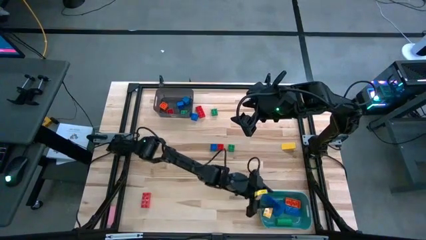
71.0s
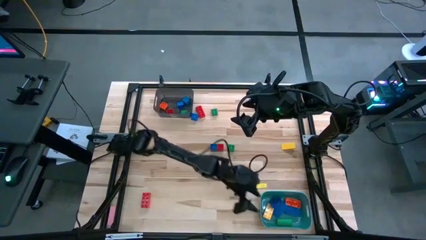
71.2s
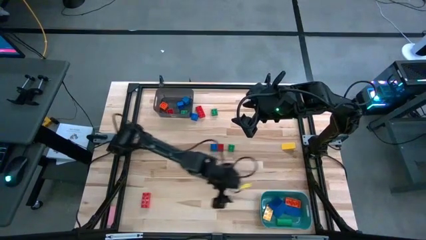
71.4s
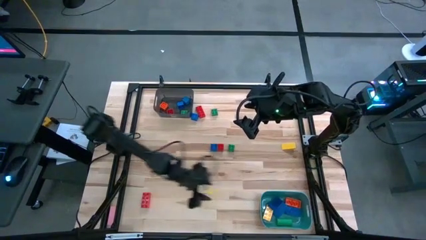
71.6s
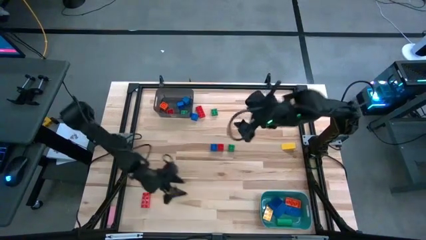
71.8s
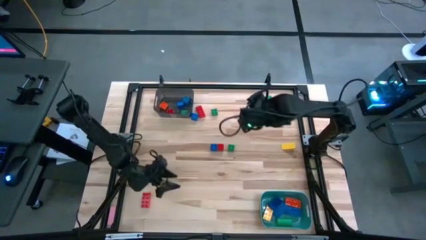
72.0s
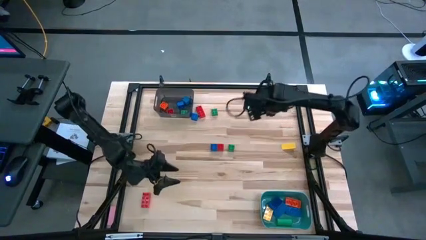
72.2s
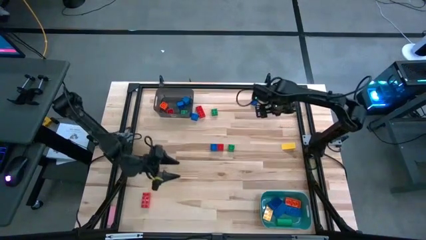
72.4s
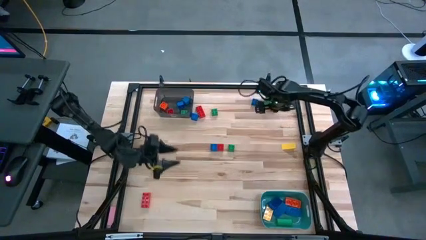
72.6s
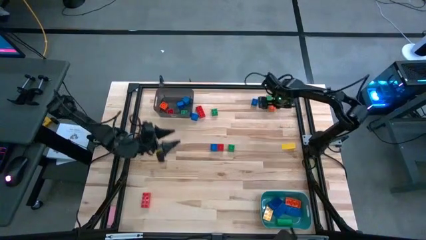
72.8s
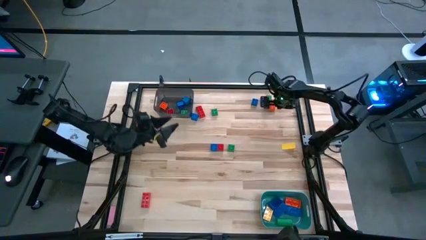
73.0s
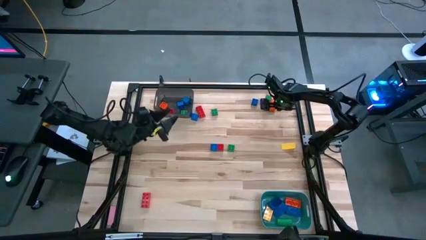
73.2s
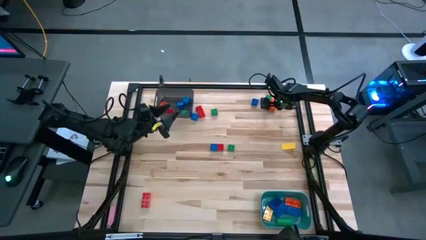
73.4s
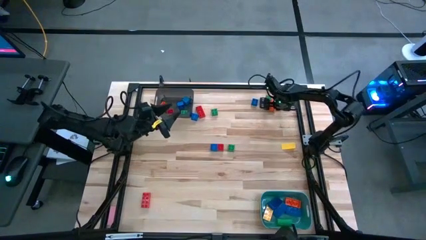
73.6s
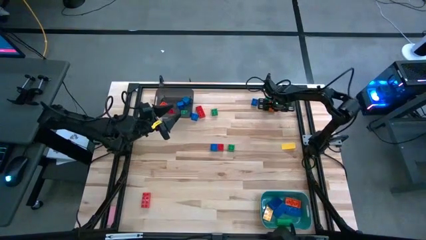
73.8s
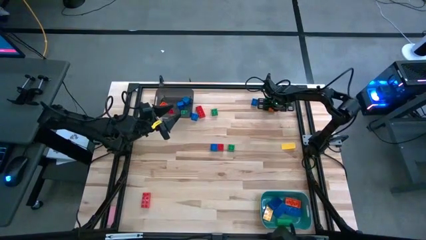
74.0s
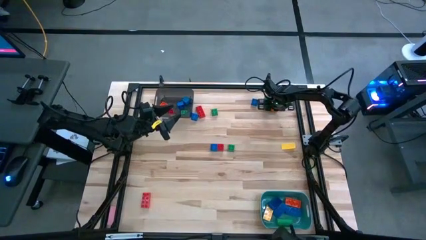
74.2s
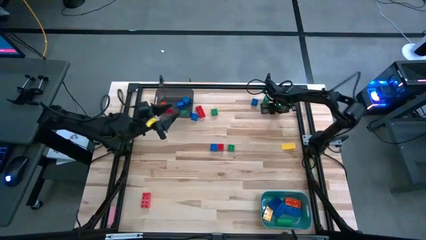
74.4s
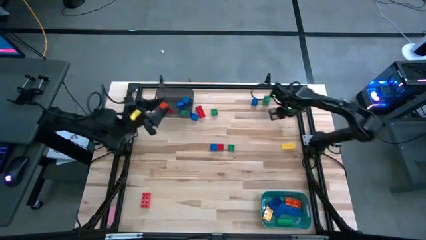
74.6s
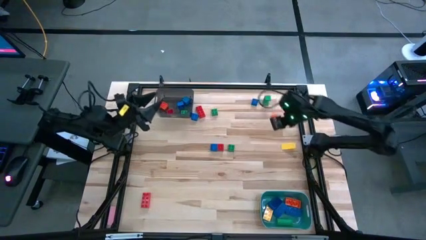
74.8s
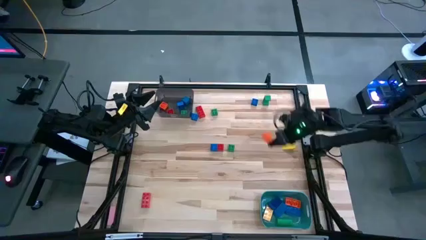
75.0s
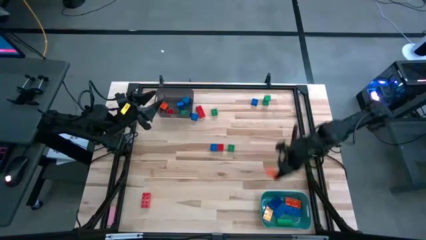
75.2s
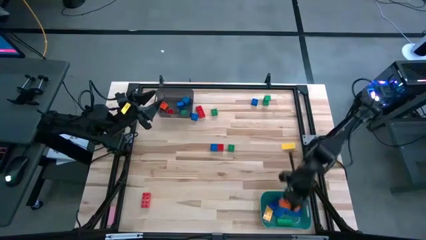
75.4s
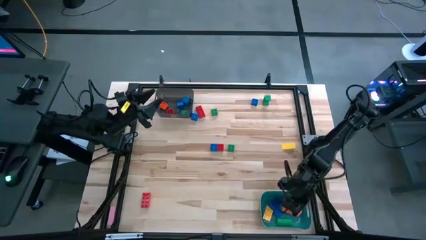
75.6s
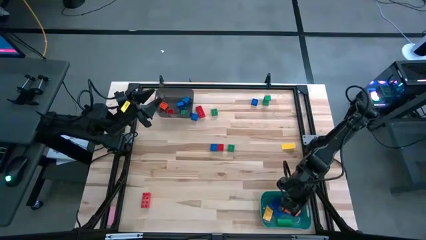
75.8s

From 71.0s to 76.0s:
Task: Sort blocks by size
Put the orange game piece into the blue bin

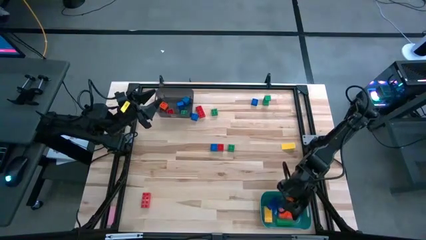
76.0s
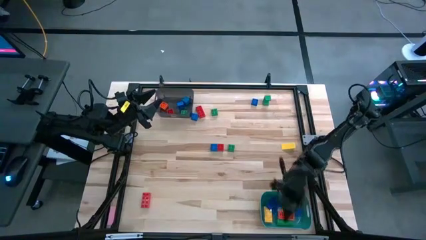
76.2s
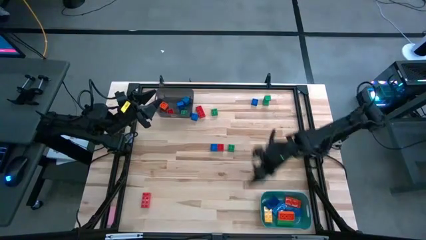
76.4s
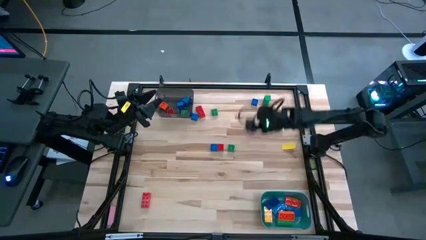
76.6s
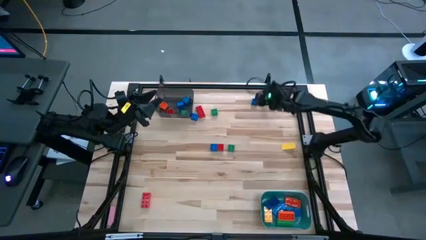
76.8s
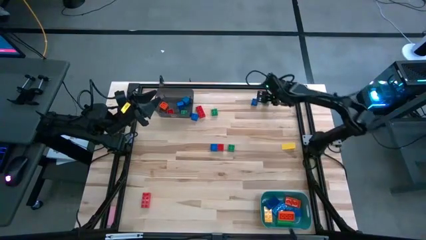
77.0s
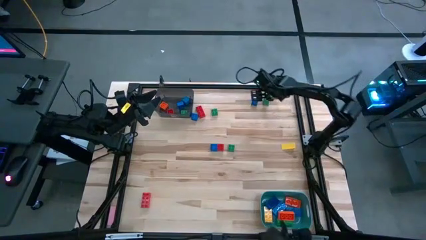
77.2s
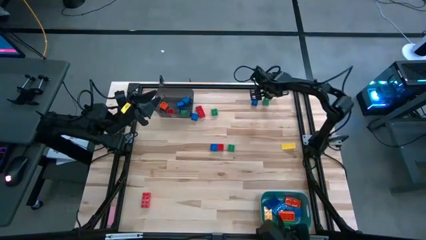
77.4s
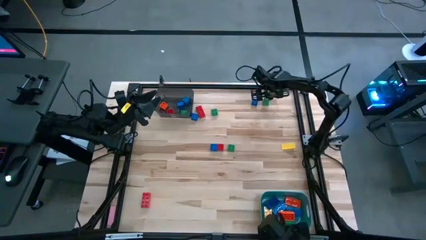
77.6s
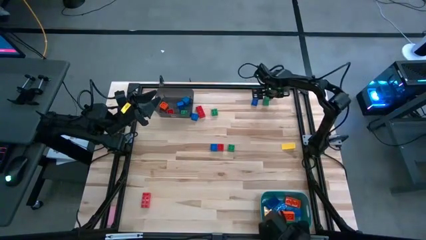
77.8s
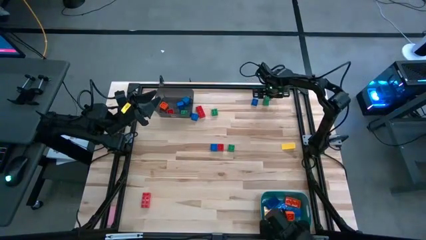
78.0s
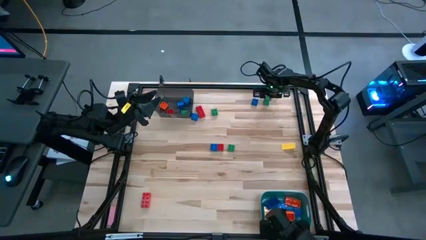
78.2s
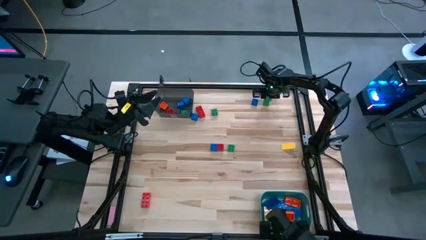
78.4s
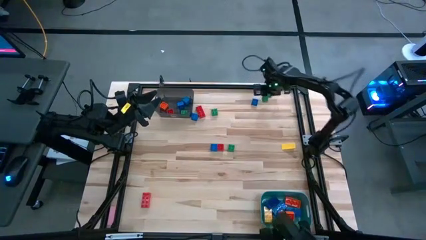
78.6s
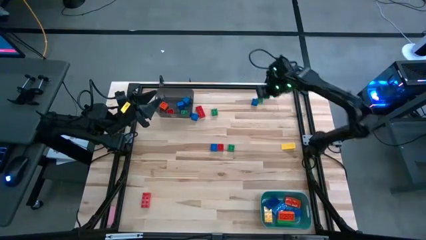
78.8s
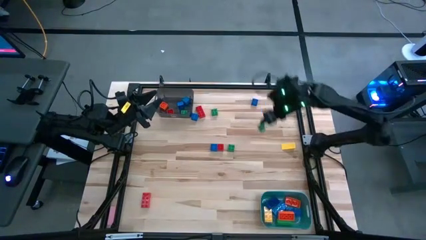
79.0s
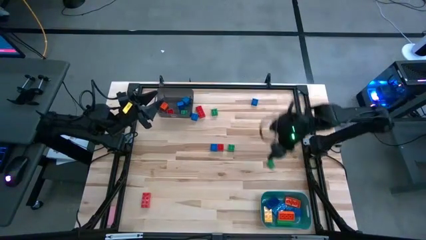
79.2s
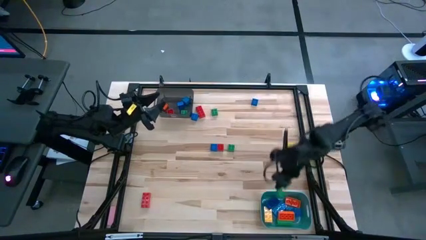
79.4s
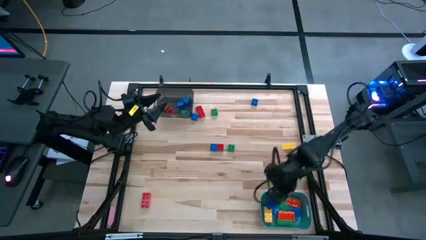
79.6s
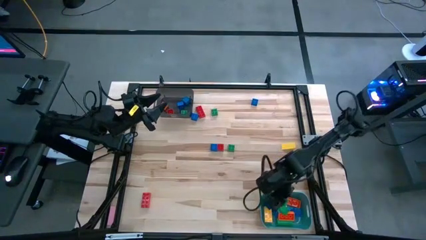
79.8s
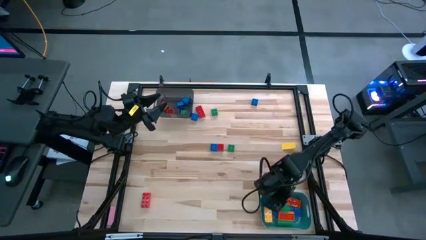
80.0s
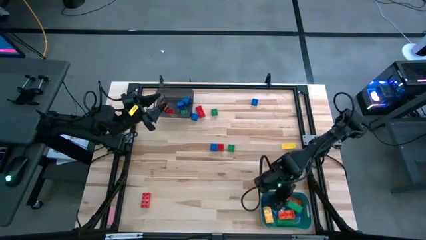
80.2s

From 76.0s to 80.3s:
Put the right green block into the blue bin

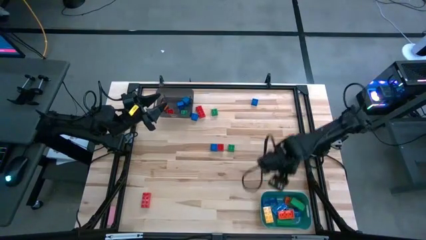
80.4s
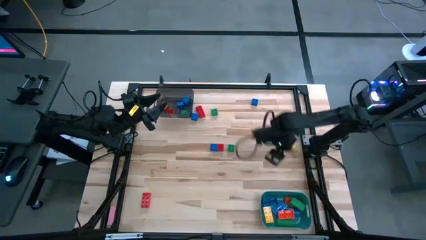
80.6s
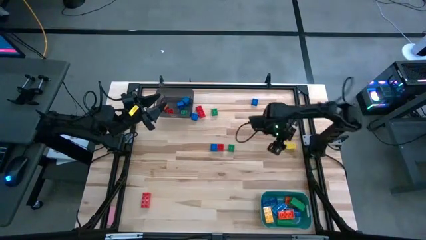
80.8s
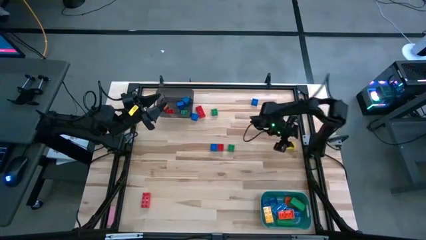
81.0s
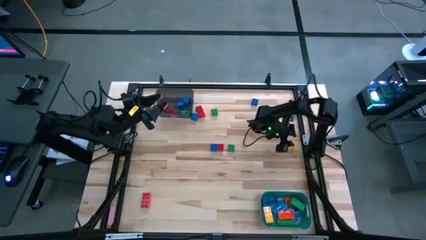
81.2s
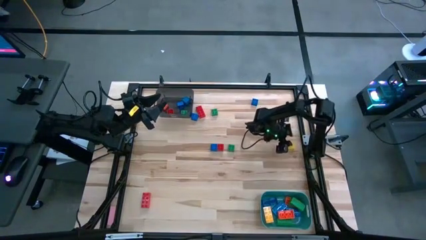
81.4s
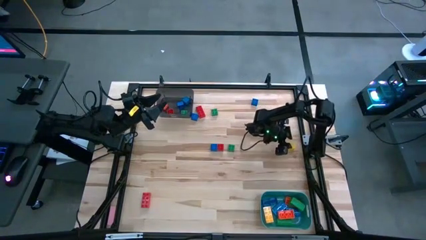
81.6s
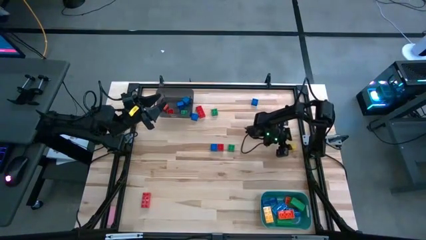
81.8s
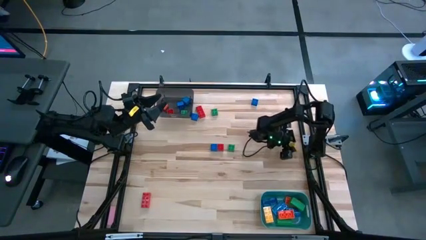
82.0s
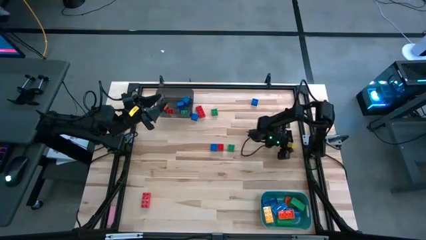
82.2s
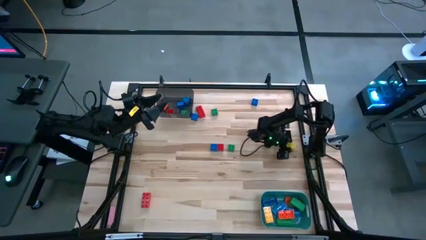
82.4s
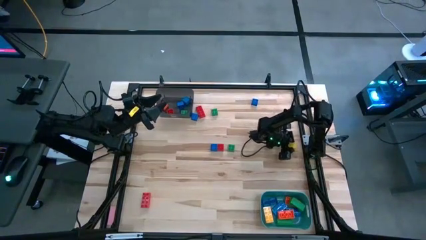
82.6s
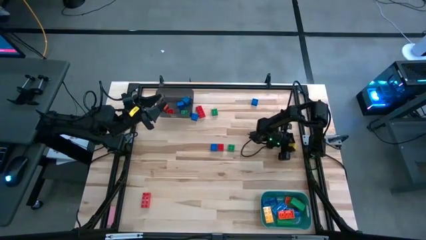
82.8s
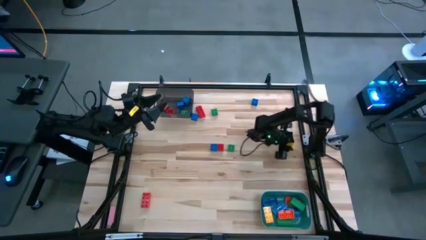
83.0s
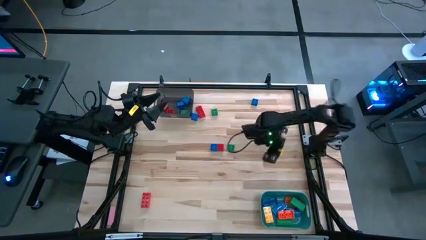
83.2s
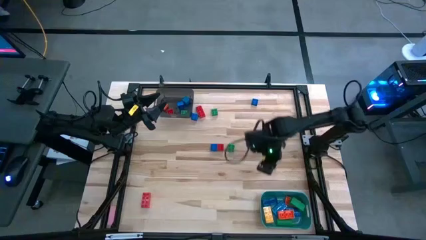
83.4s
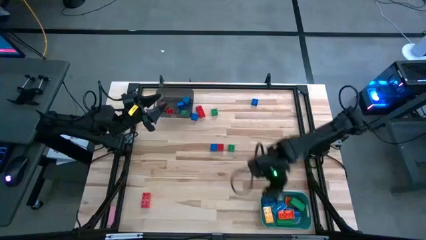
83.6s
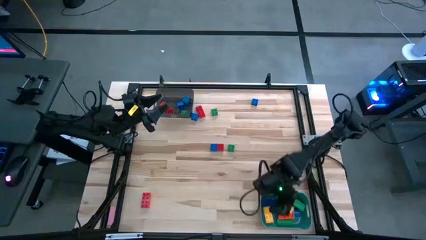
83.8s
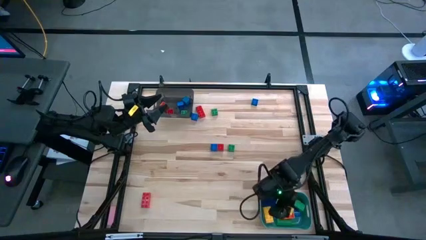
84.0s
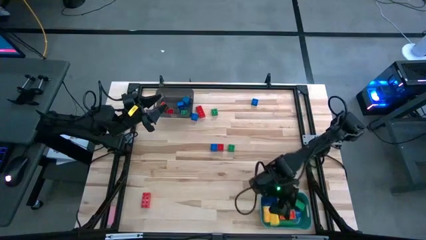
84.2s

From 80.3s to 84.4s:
Put the yellow block into the blue bin

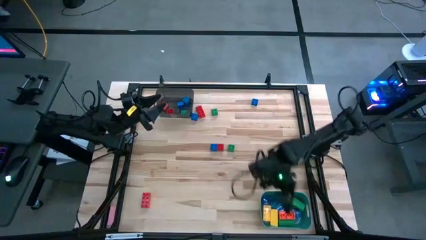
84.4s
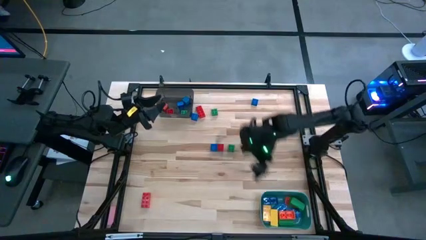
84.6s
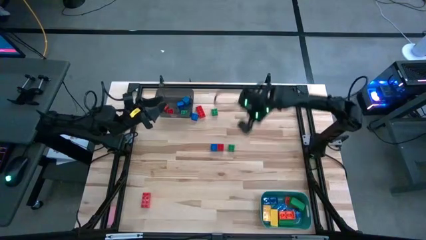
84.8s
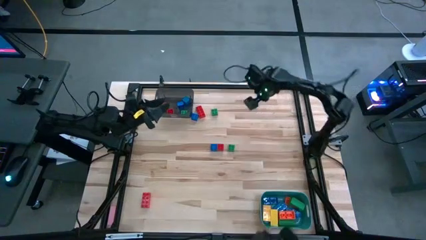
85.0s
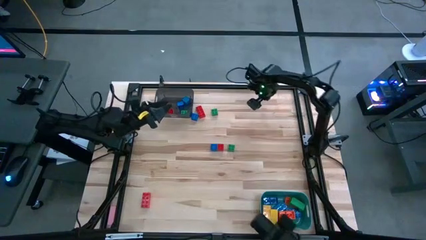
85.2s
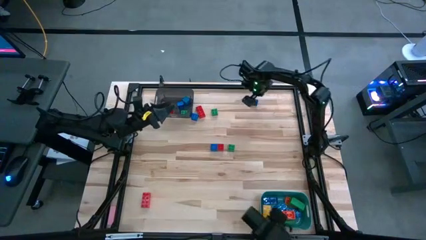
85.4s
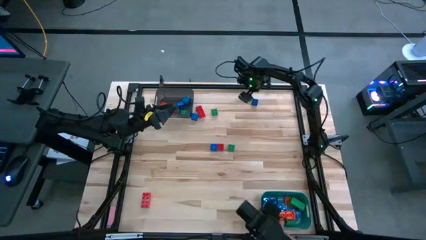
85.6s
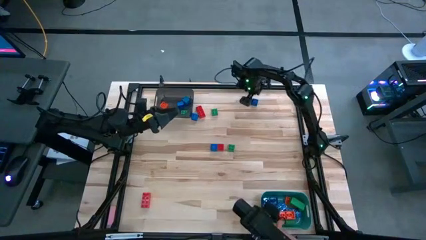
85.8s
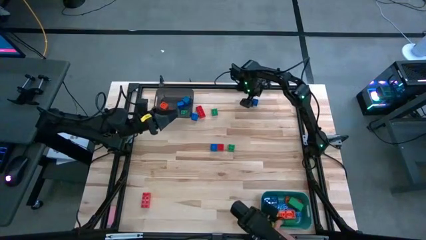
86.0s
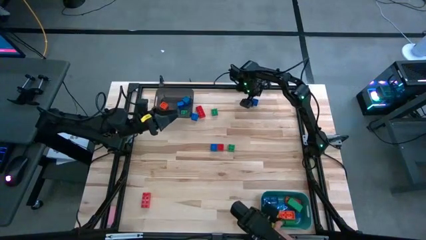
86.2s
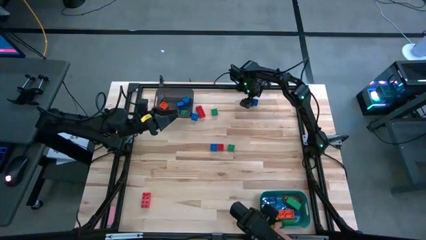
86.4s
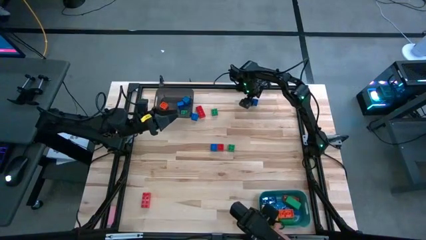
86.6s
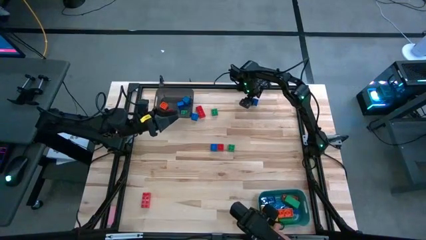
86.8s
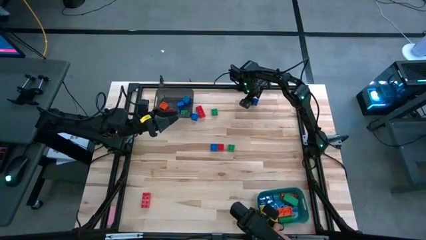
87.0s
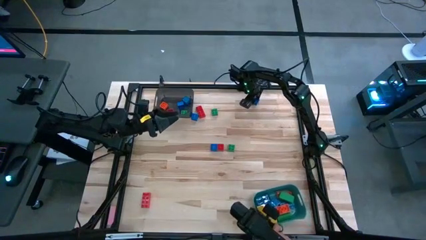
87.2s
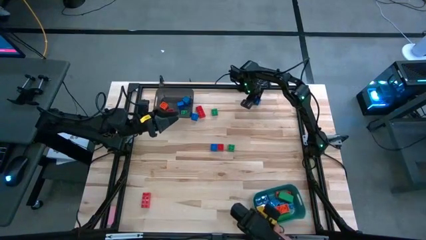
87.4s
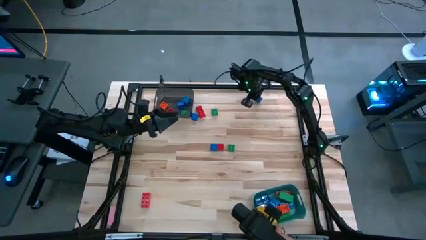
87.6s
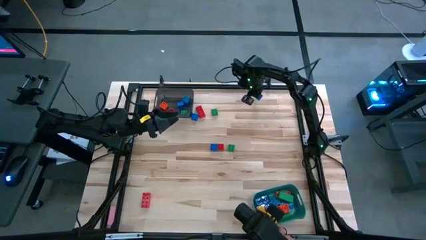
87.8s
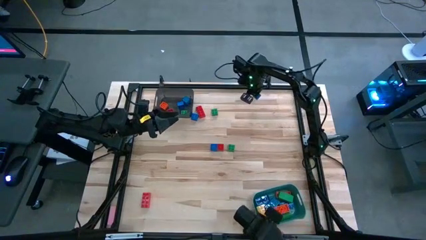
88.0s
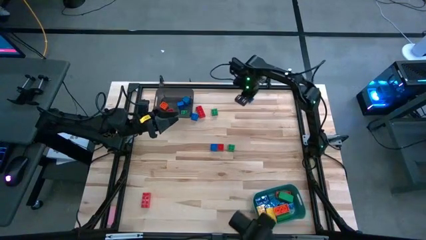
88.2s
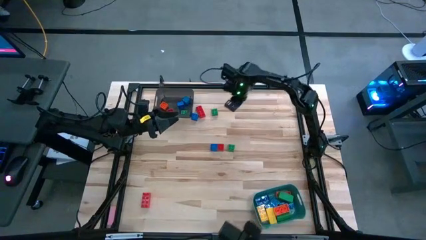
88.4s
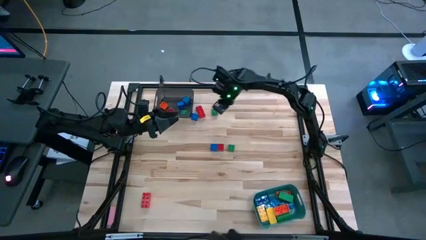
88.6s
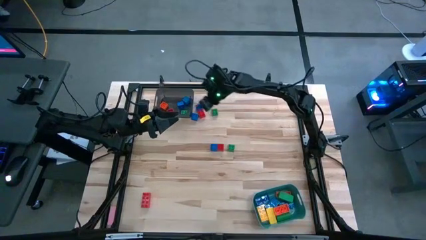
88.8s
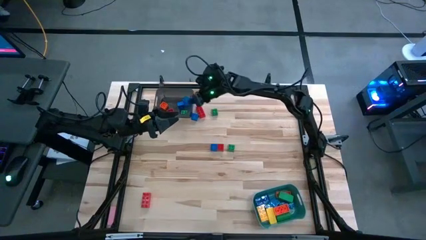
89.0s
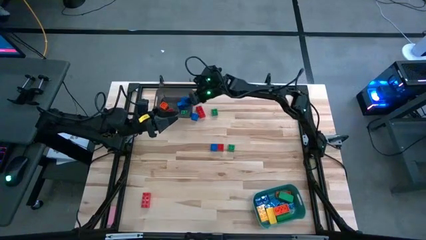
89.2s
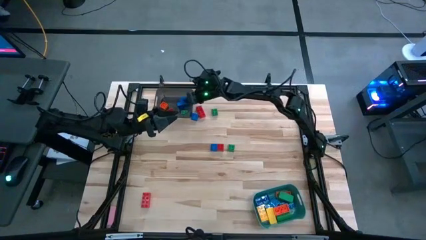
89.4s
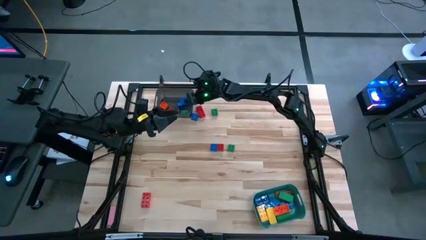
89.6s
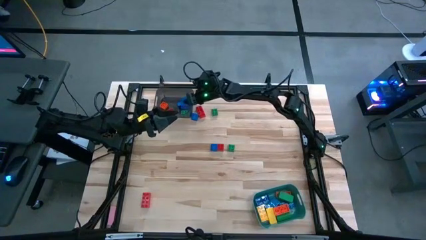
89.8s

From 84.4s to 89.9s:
Put the right blue game piece into the black bin
